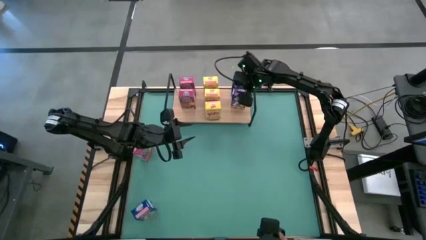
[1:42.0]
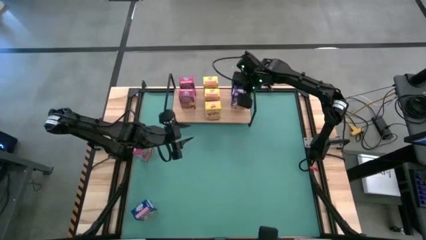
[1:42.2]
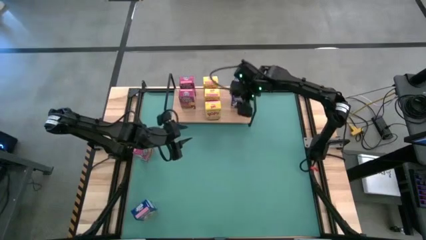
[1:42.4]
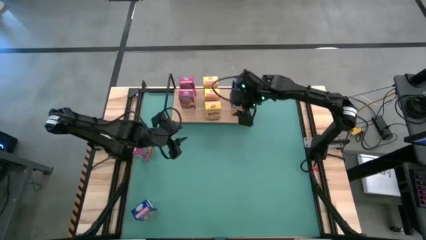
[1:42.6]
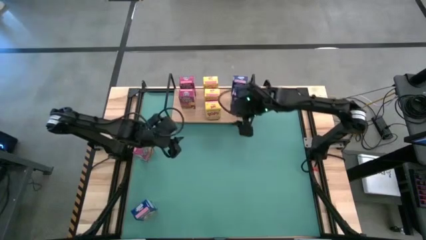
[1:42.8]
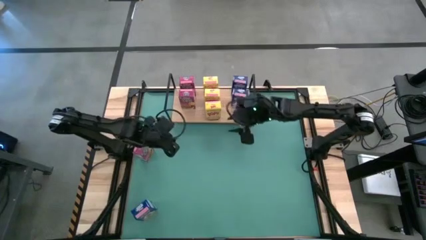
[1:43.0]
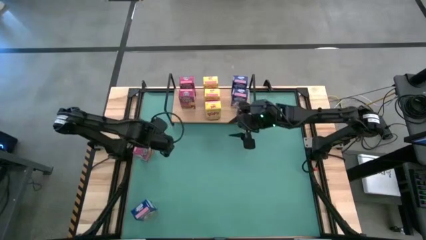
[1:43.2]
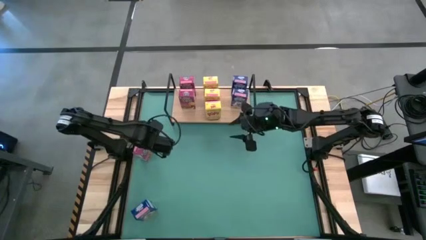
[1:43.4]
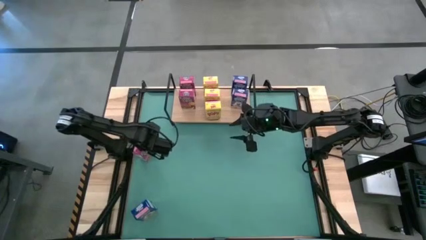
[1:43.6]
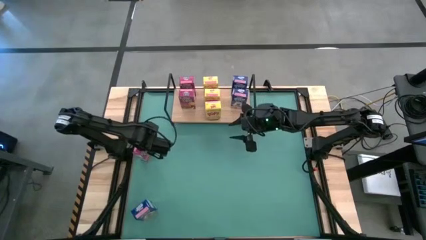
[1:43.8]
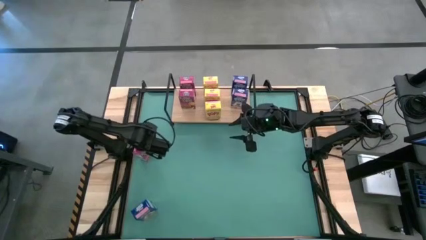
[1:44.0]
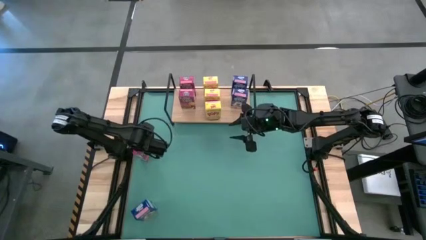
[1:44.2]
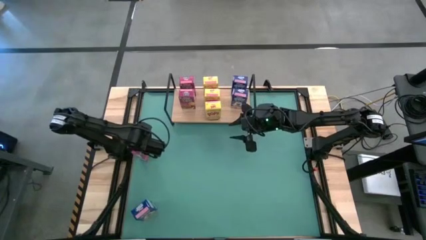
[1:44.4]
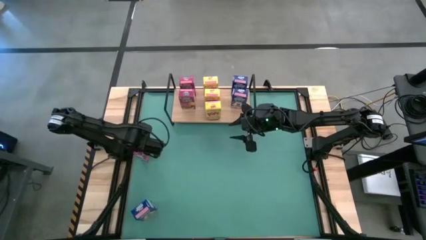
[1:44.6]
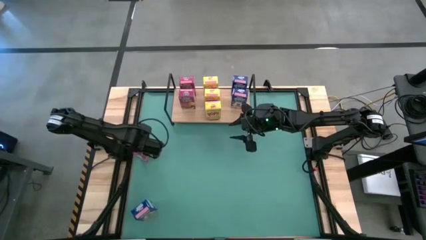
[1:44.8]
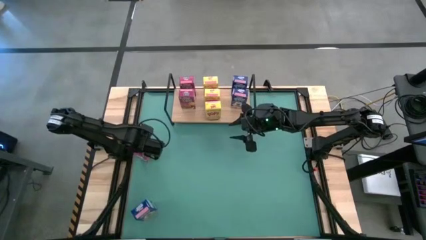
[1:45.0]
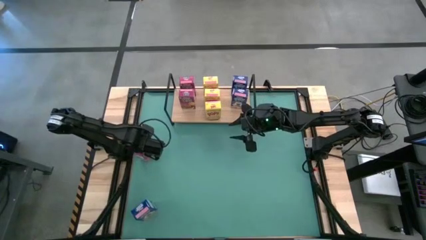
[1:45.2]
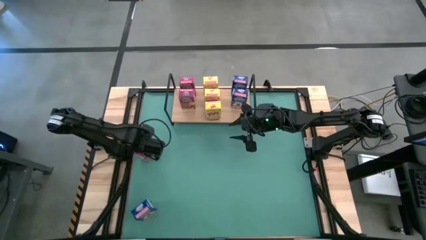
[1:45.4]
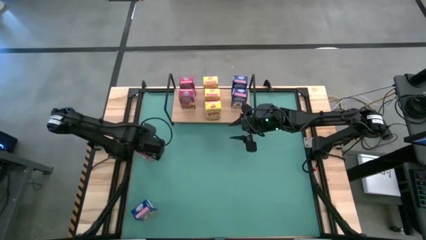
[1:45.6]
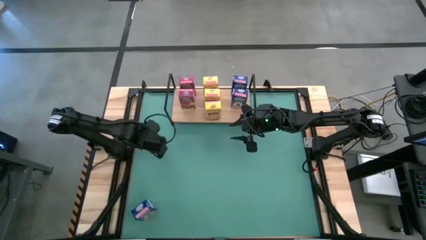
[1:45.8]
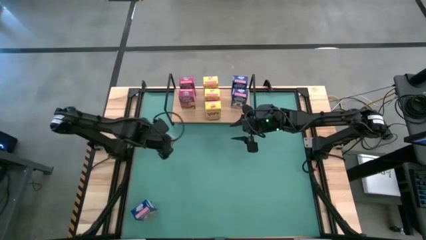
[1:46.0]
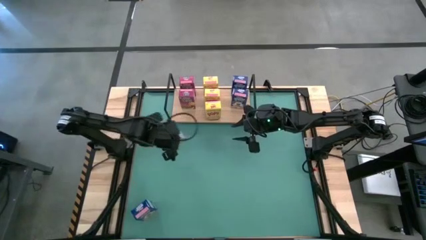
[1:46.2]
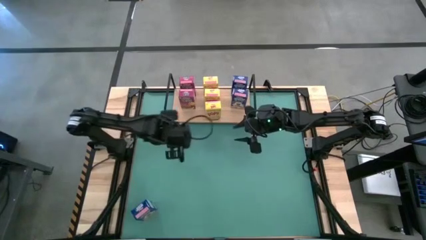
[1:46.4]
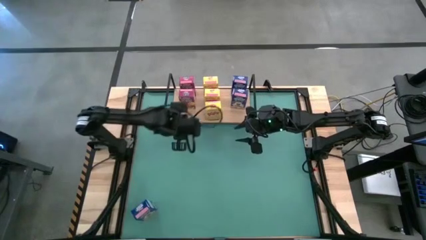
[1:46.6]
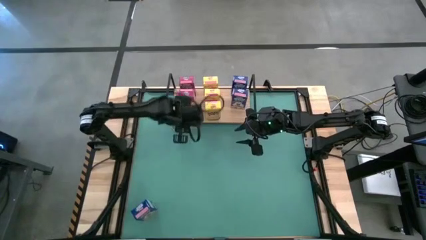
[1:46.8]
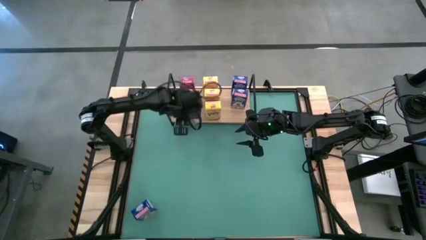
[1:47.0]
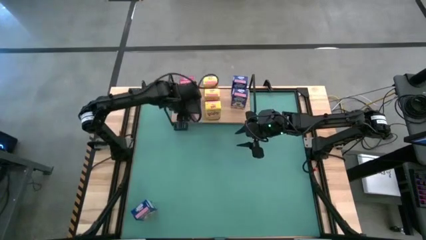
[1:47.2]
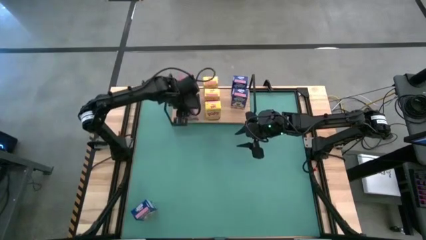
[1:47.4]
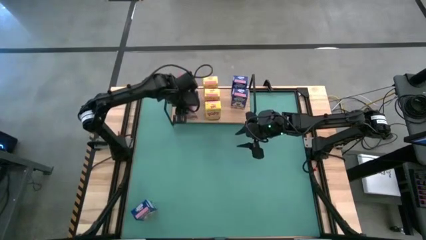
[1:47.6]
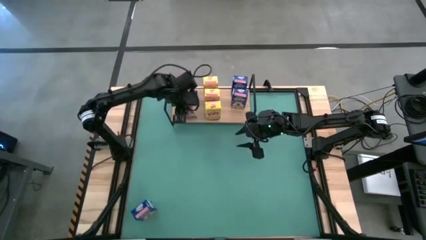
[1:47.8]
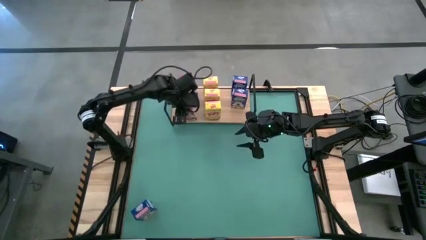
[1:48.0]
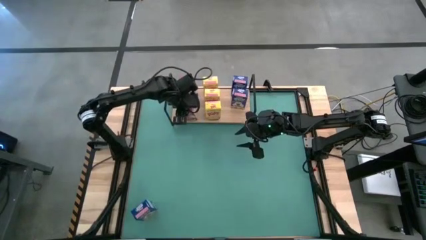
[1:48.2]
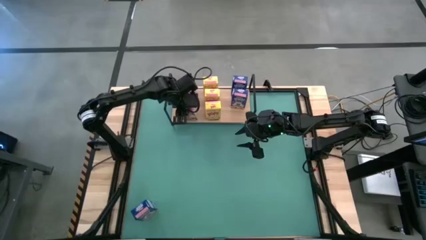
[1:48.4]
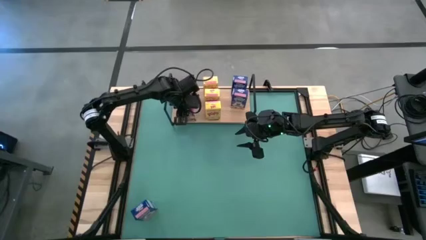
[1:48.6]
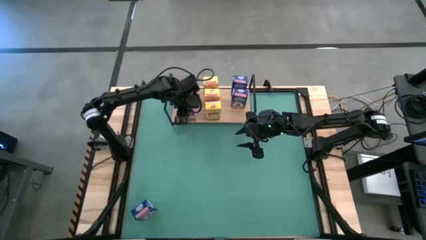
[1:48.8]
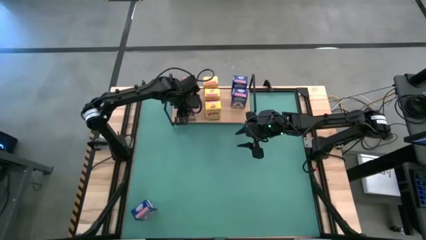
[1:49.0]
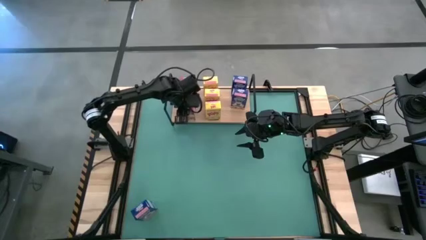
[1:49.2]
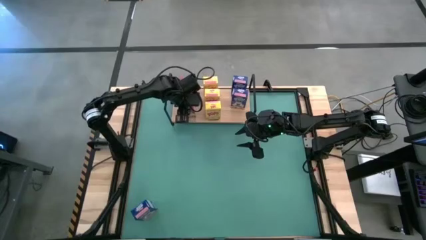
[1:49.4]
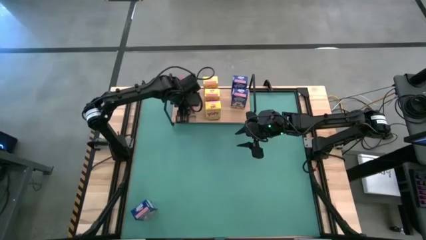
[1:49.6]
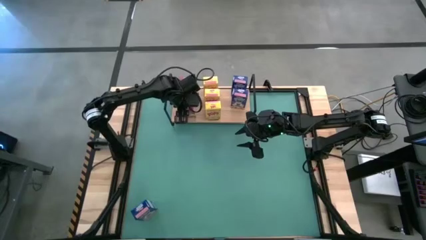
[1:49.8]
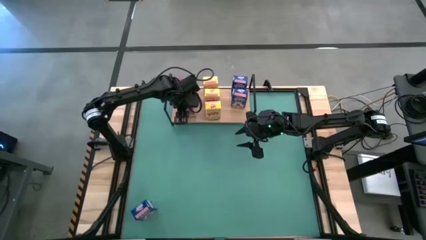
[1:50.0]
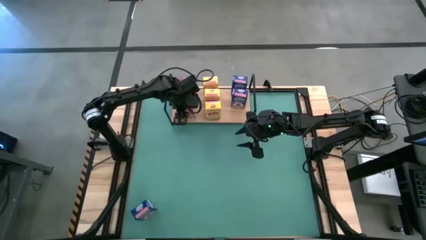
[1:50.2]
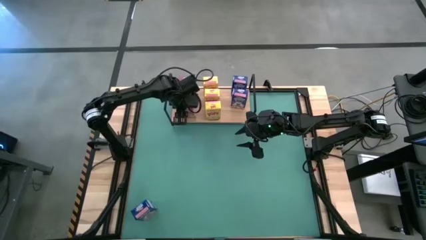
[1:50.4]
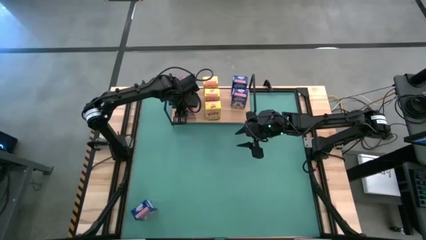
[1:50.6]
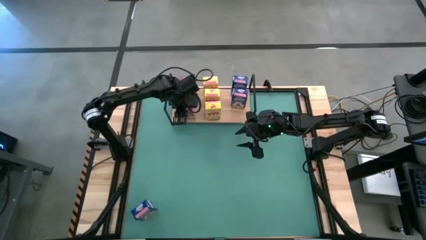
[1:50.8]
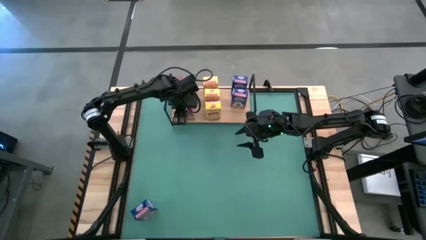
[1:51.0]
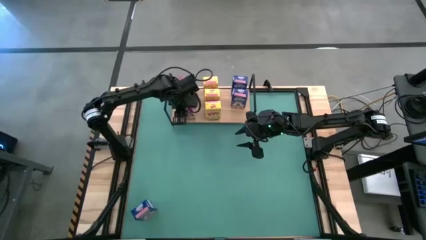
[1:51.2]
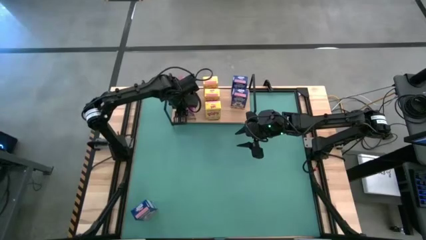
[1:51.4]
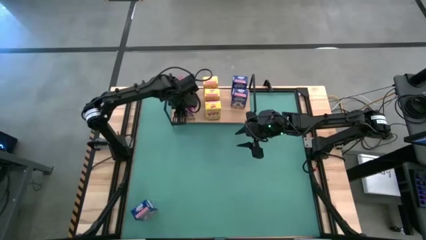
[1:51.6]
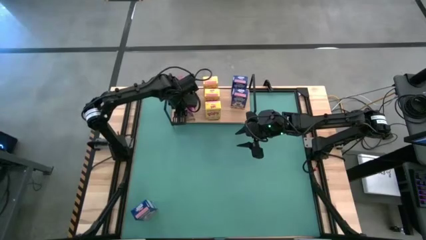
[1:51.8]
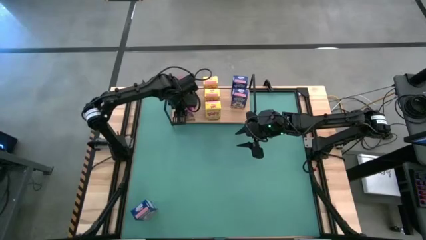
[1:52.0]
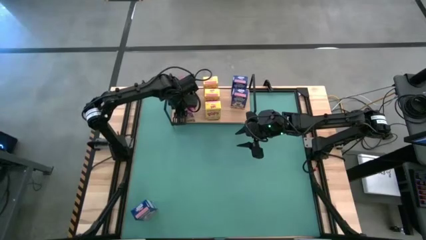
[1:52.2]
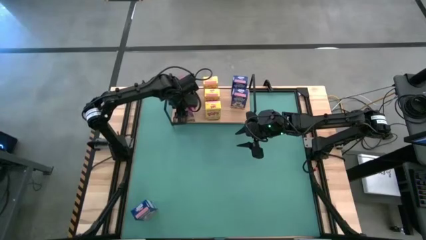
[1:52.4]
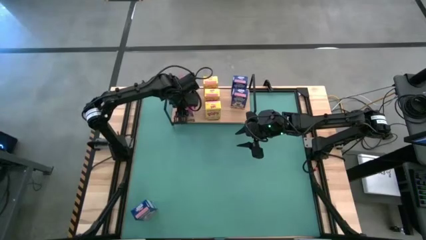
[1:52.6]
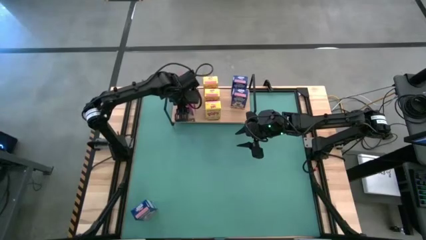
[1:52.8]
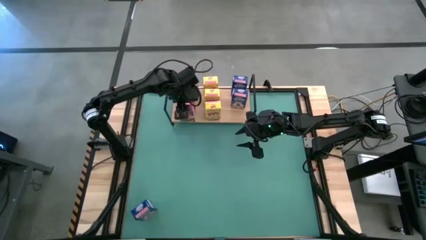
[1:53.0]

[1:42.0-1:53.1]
Task: Stack cereal on shelf
Put the pink cereal box on the shelf aligned with the other pink cereal boxes
